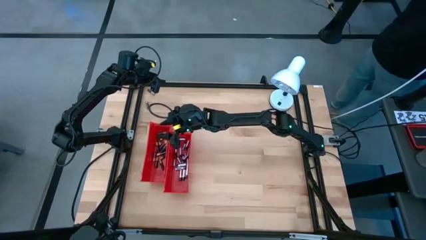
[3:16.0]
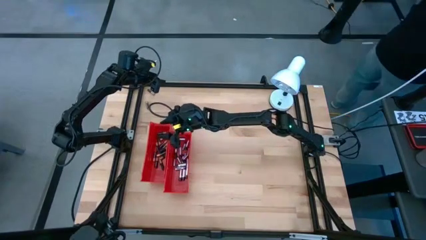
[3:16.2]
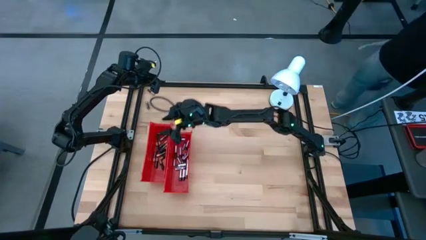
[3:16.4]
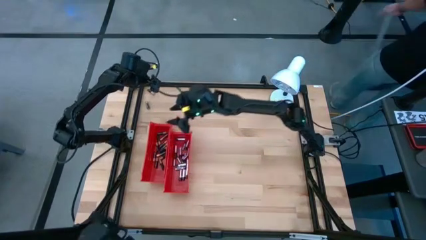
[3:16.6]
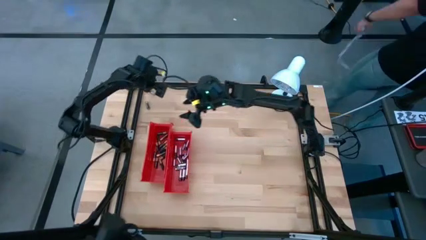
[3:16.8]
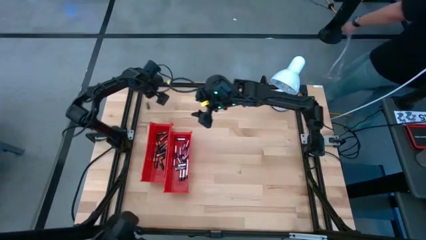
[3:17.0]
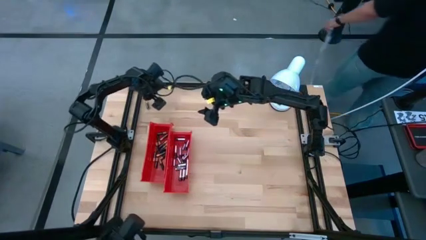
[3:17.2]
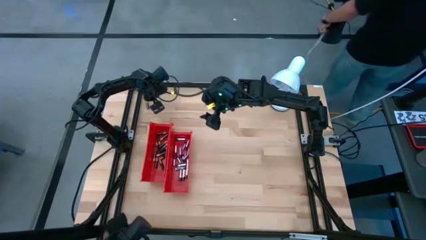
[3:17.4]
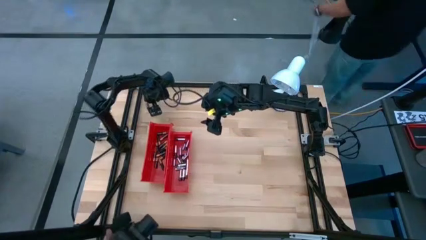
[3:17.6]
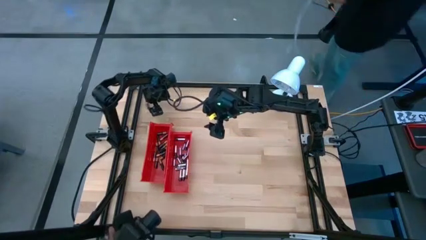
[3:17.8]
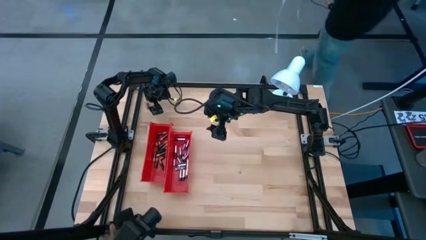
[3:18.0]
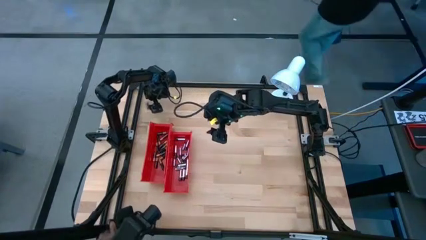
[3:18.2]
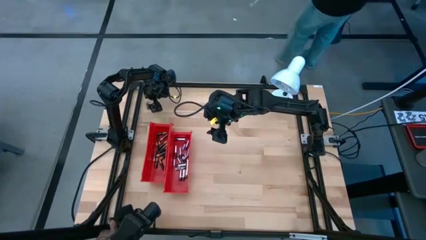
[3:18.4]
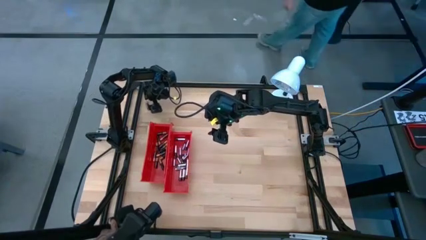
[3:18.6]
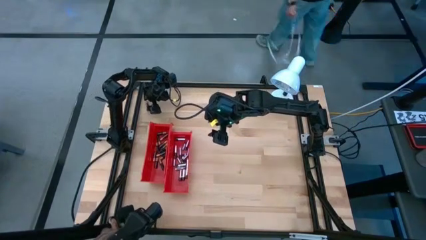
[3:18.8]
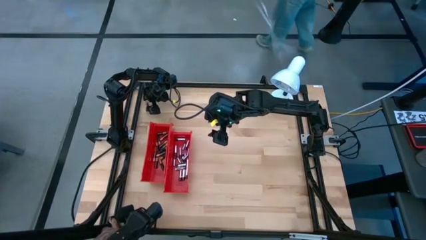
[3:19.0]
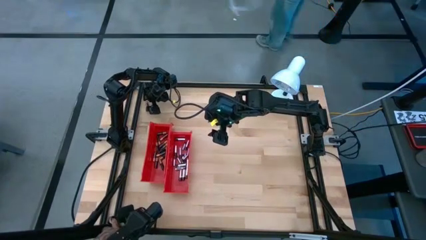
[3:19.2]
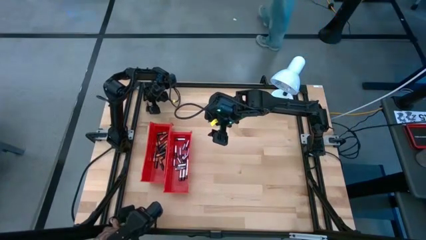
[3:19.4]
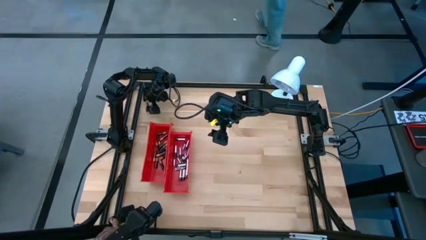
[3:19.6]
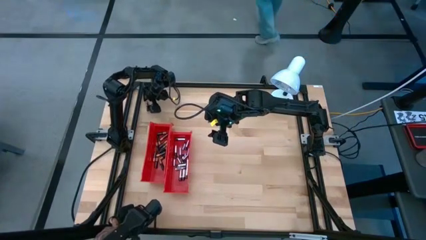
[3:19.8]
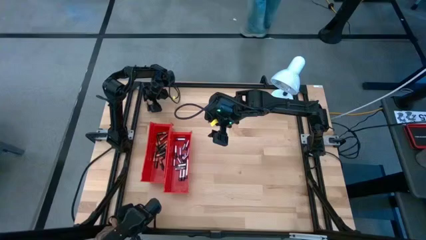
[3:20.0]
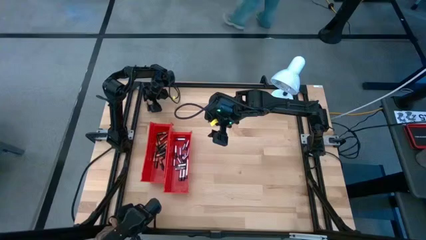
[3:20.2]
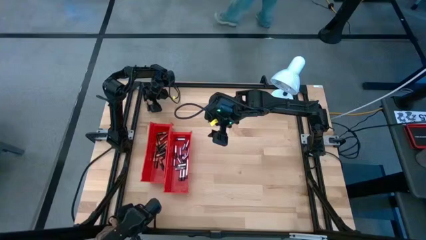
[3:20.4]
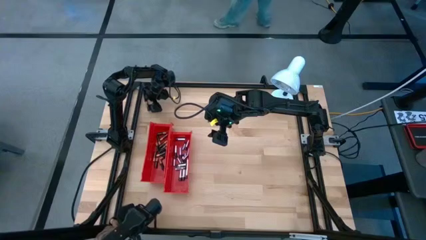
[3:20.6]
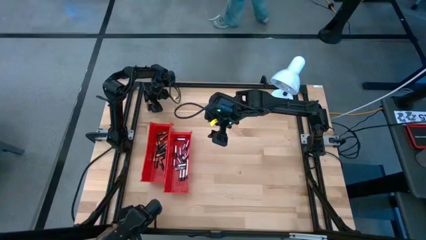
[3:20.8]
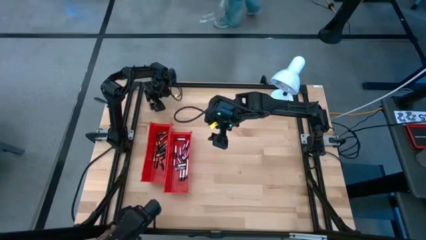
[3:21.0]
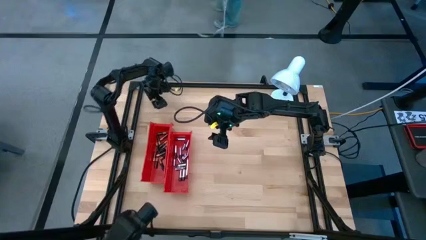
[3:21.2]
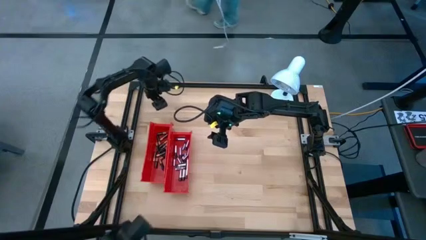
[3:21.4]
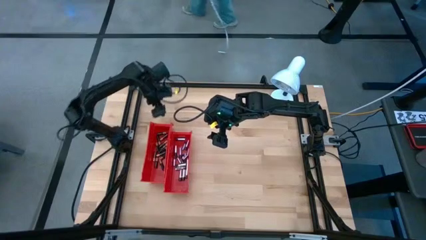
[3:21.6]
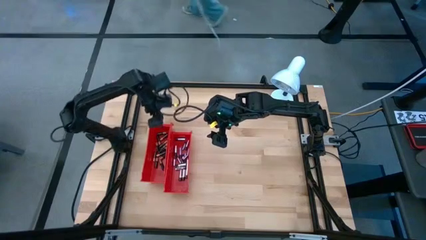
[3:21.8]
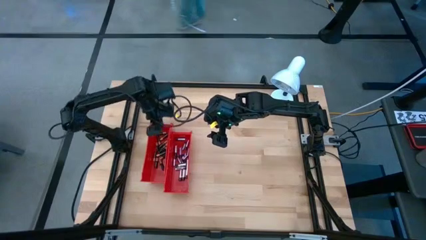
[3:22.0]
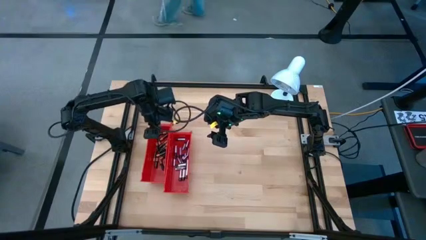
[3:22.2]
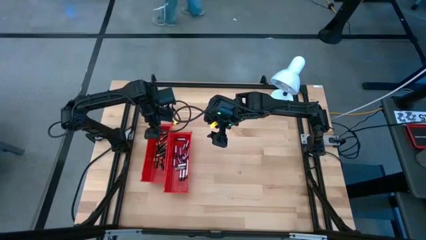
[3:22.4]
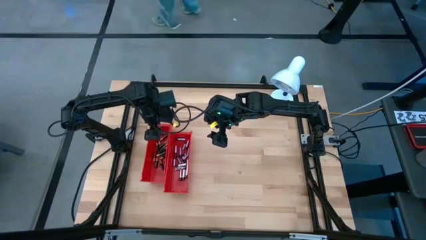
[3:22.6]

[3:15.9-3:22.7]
Task: Sort batteries
Put the black battery into the left red bin

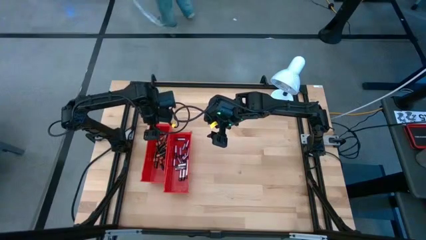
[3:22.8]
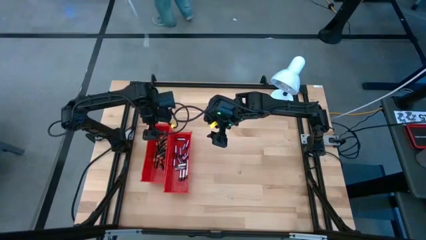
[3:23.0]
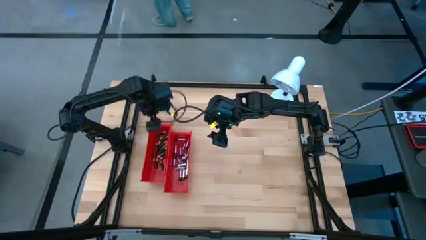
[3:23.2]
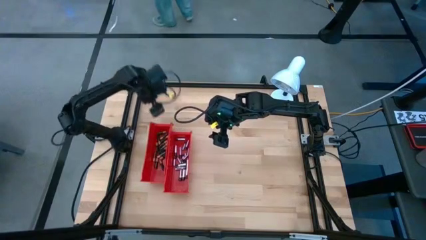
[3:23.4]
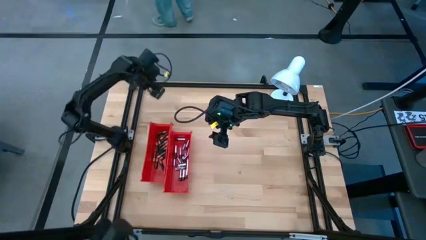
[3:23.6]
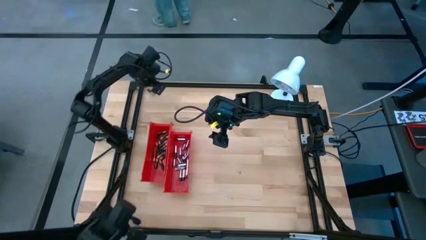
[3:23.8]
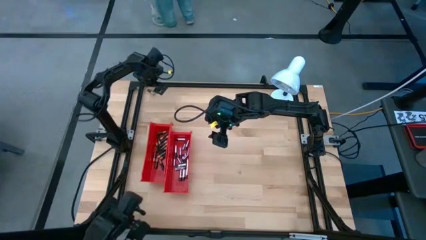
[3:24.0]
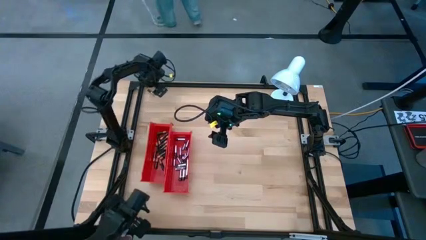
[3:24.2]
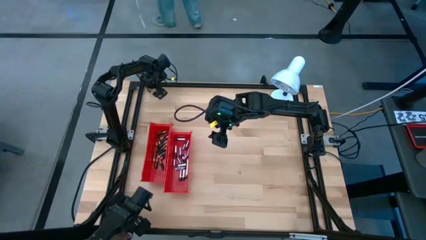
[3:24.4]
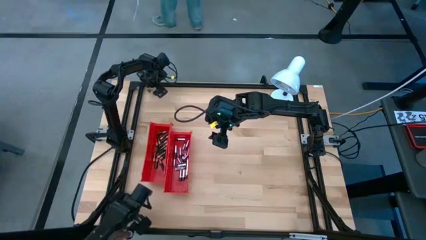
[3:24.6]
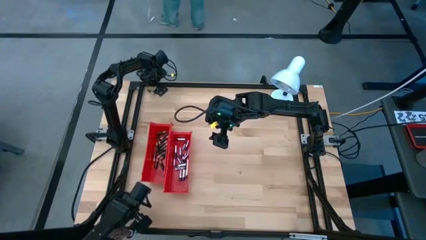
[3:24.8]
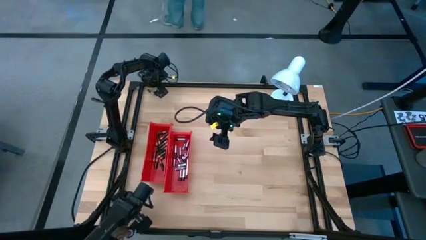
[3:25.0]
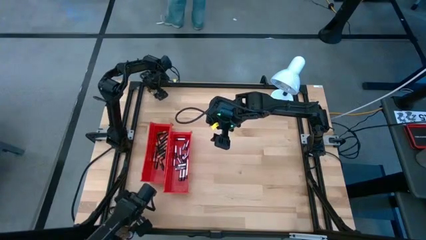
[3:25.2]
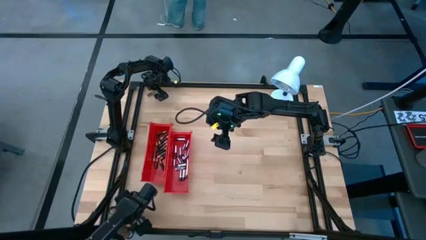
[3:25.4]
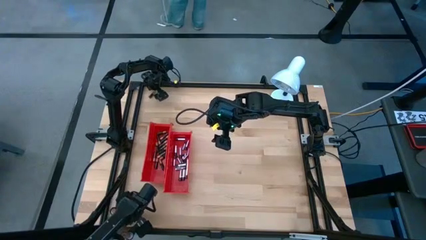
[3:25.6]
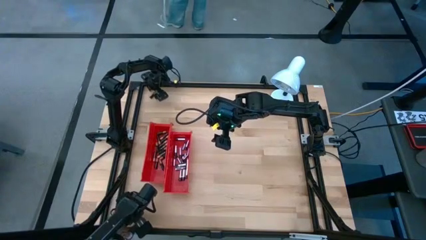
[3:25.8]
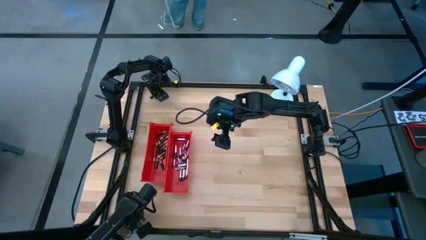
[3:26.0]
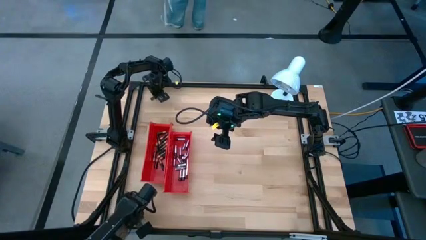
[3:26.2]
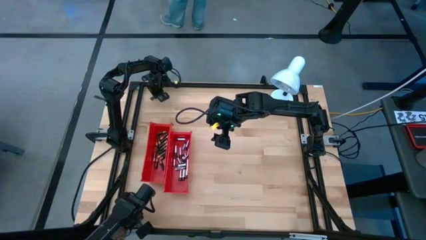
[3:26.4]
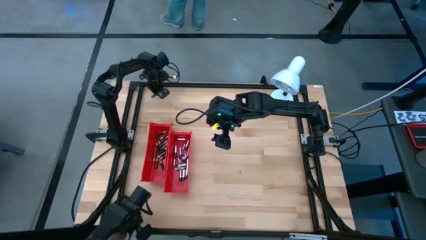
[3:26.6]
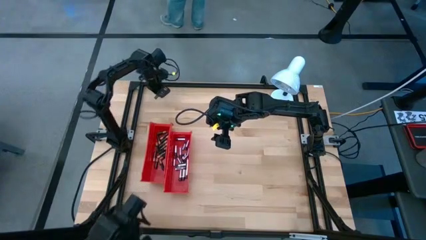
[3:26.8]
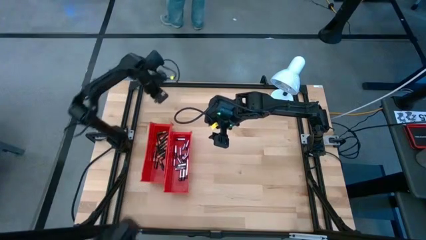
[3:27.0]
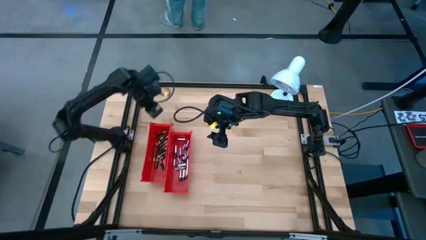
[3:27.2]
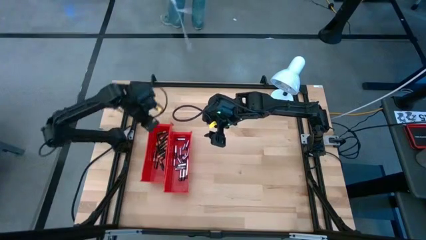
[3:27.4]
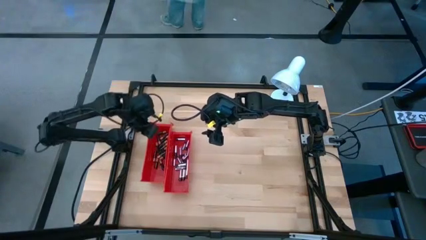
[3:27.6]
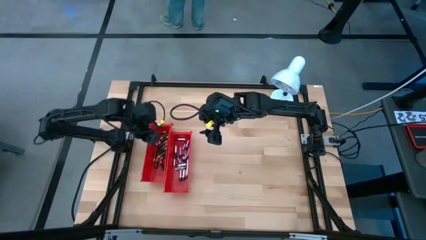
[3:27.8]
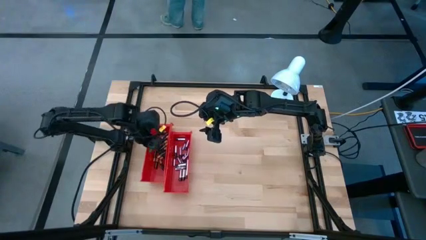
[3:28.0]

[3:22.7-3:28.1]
Put the black battery into the left red bin

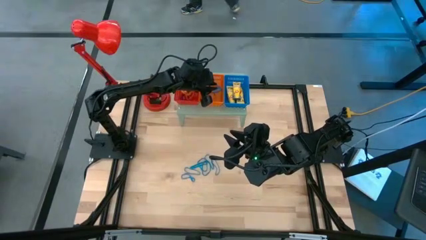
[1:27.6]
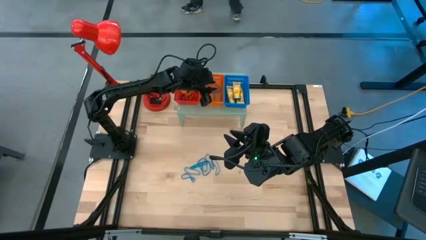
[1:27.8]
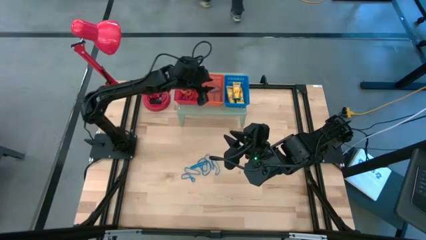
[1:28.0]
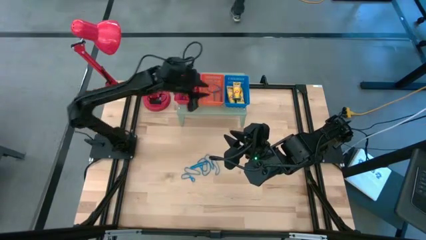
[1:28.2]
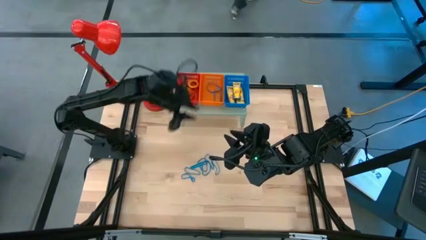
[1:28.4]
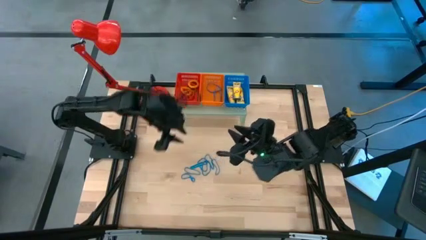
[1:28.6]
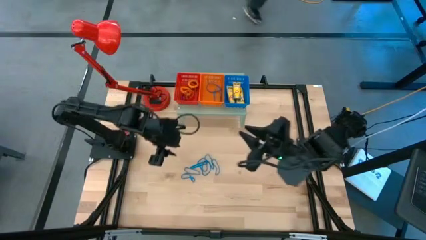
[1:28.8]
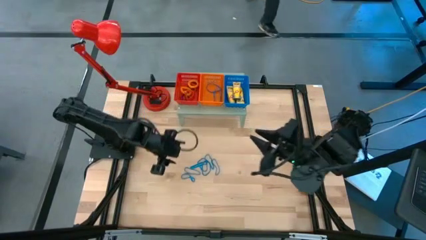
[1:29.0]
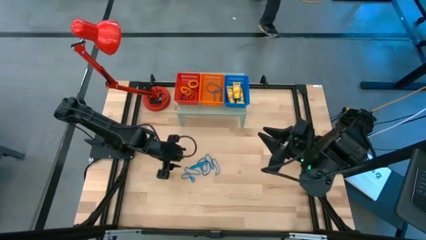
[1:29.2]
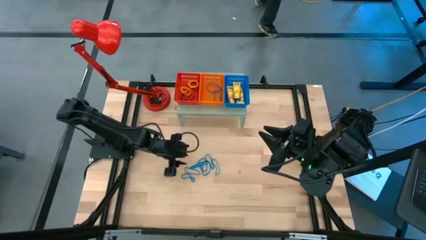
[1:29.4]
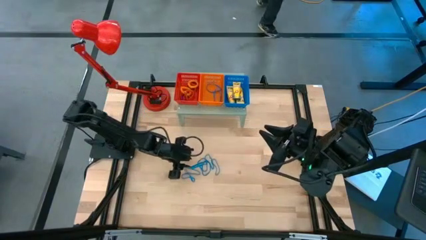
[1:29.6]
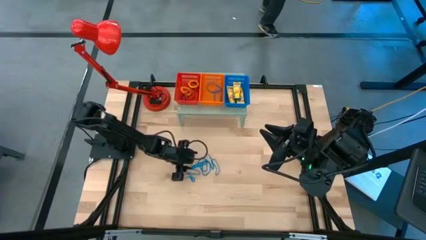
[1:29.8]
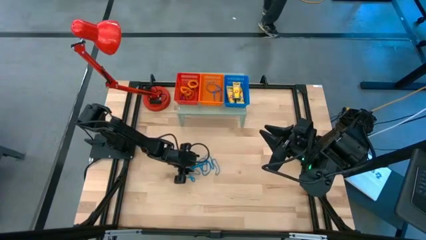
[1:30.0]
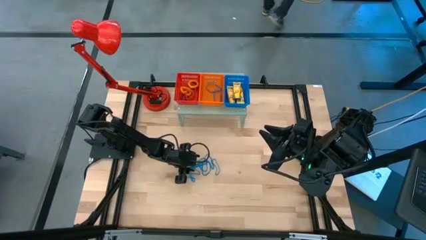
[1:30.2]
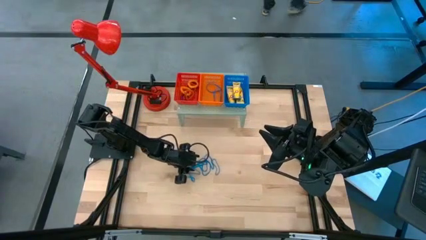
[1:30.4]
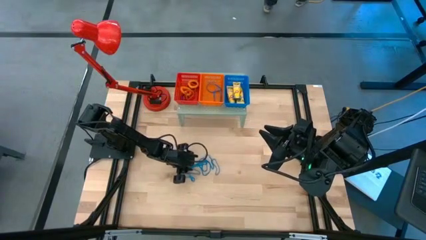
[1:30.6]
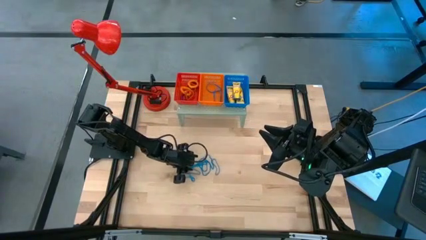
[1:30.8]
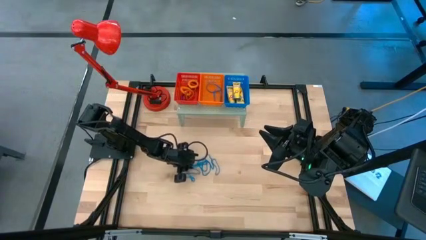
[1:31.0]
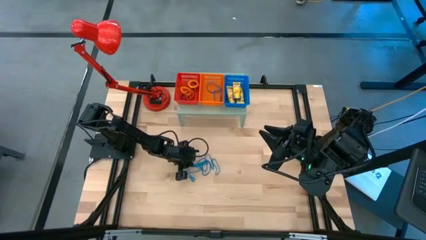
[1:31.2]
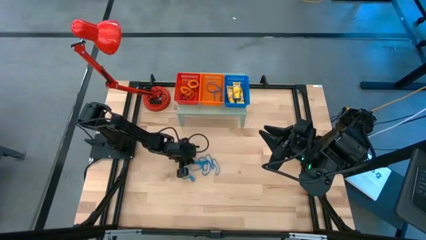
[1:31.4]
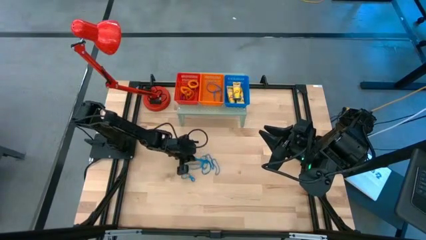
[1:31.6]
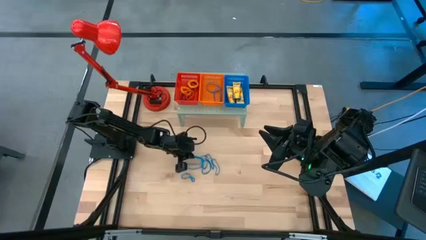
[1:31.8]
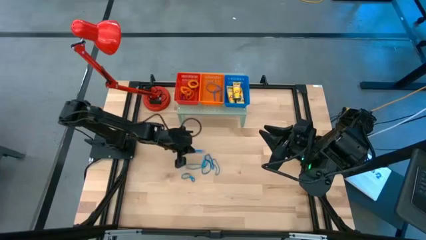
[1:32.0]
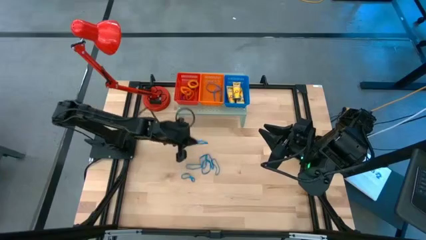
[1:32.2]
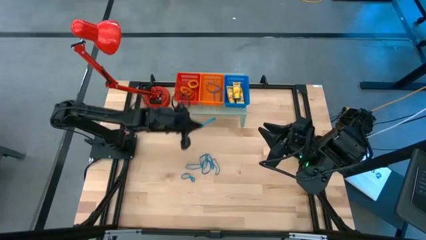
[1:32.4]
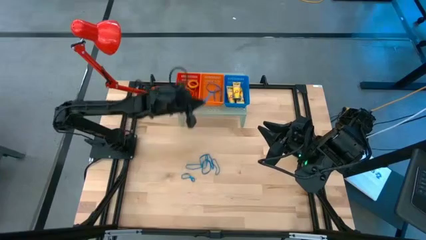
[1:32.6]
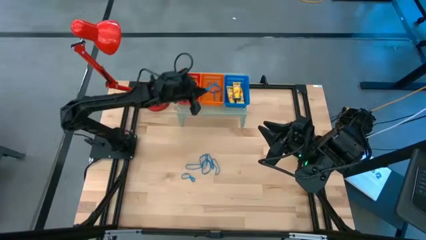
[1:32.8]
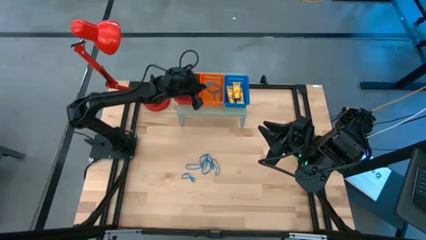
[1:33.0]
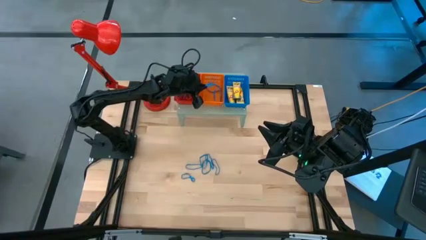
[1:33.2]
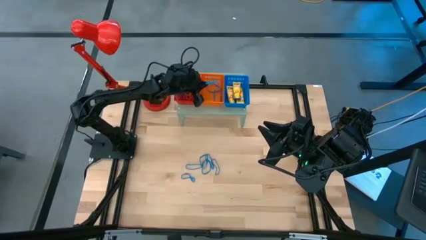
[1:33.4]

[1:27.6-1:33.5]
Task: Pick & Place Office Desk Supplies
Put the blue rubber band into the orange bin on the shelf
